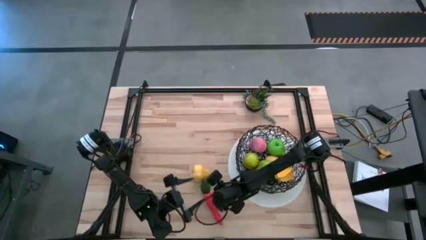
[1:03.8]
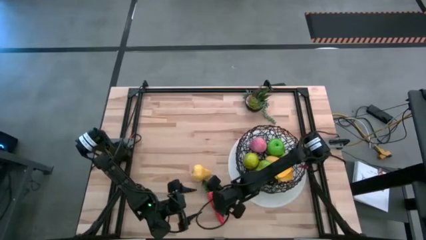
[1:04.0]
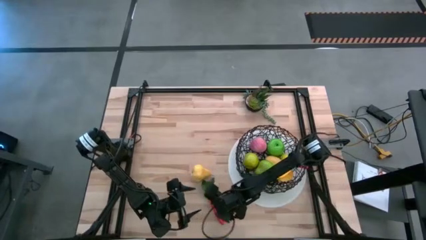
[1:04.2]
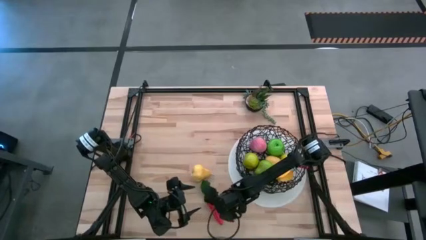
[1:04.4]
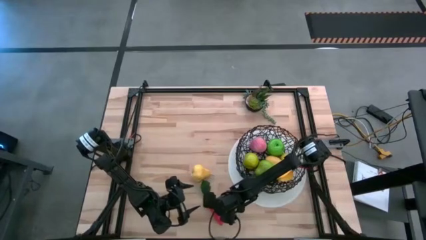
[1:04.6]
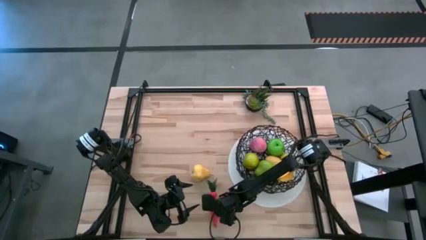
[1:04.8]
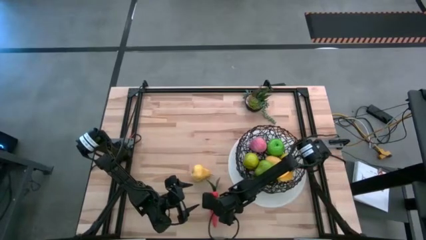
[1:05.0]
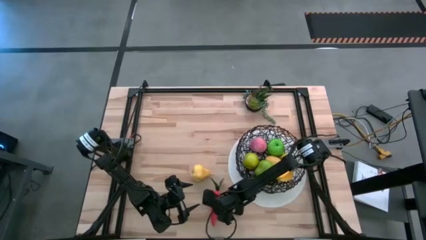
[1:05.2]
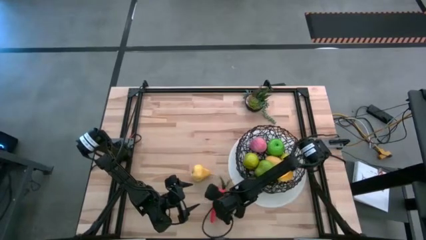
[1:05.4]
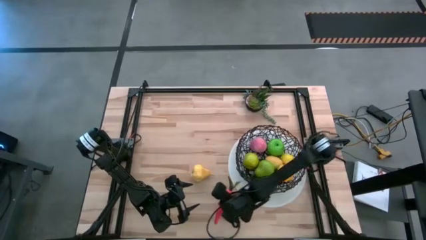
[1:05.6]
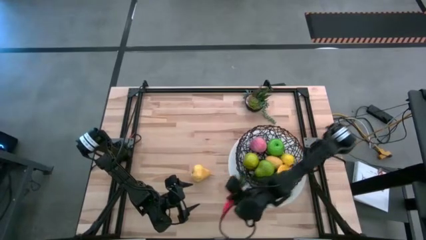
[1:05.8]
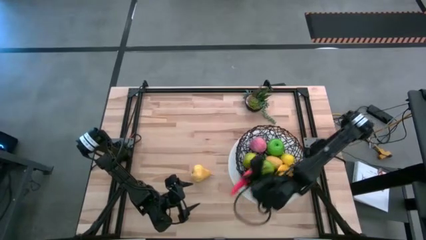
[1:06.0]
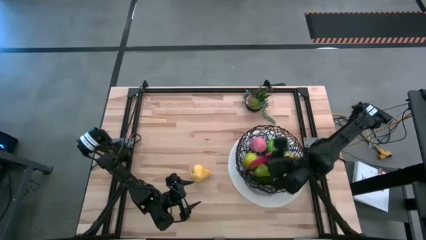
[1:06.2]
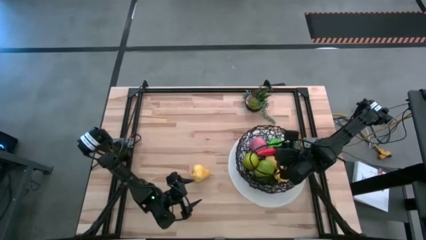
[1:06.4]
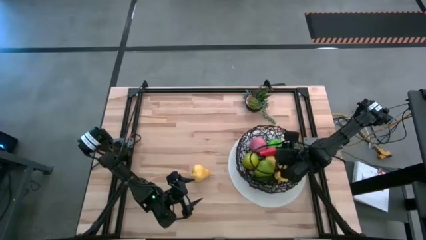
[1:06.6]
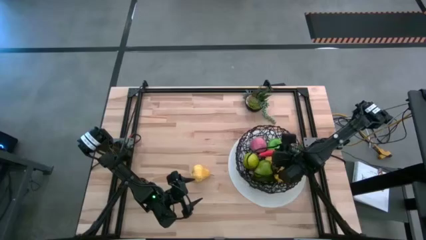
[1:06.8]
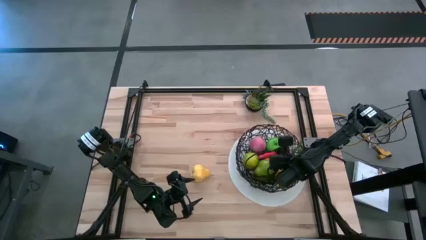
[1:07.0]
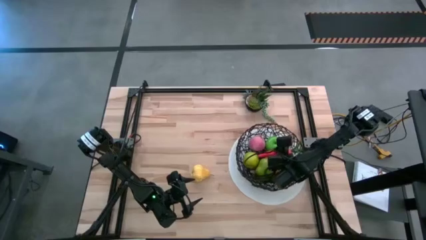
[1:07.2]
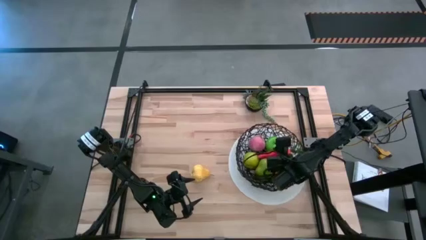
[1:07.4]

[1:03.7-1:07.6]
Task: Build produce basket
Put the carrot into the wire basket

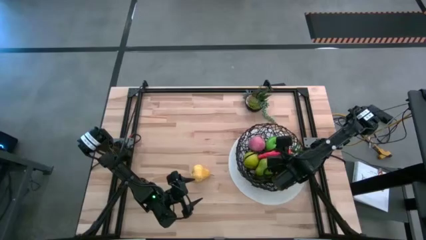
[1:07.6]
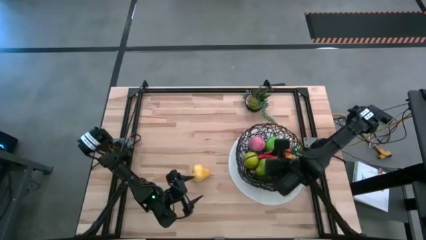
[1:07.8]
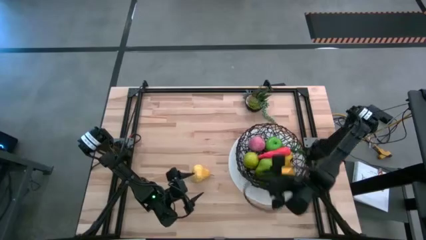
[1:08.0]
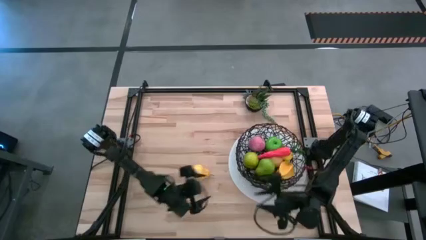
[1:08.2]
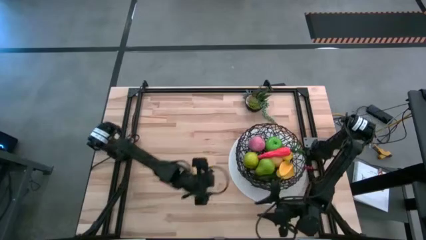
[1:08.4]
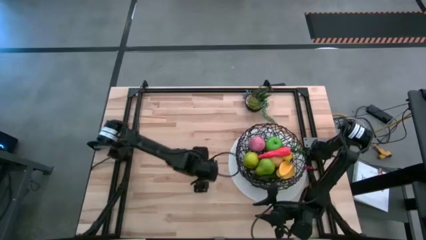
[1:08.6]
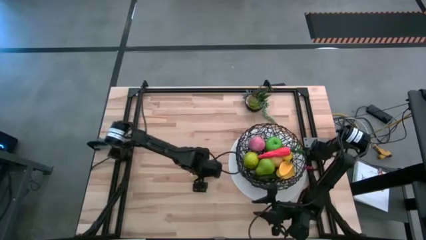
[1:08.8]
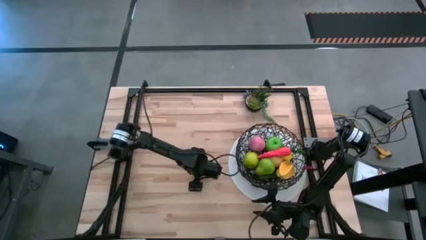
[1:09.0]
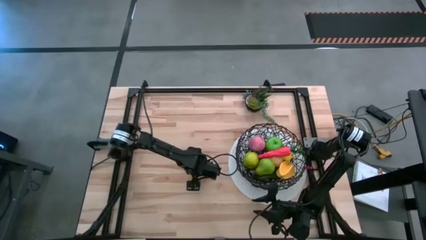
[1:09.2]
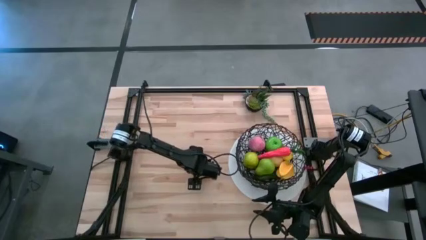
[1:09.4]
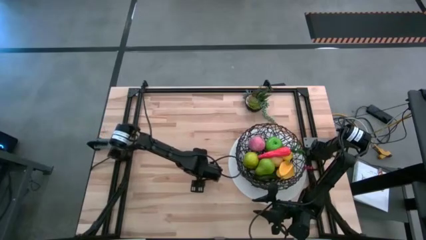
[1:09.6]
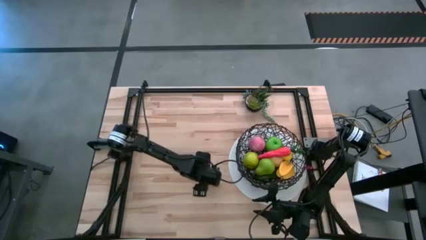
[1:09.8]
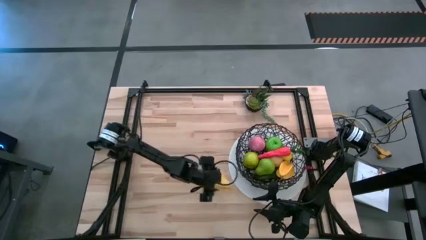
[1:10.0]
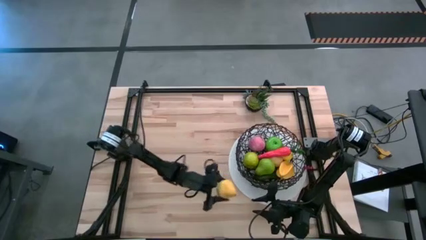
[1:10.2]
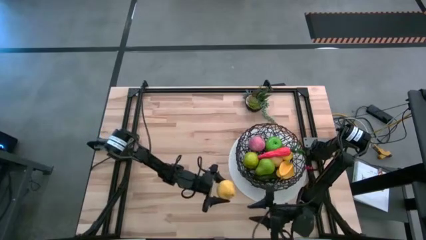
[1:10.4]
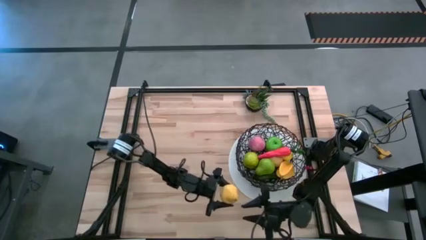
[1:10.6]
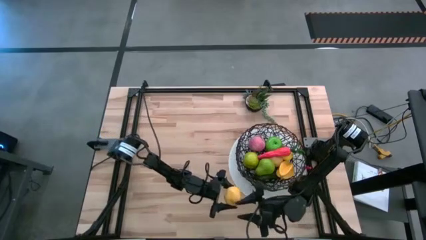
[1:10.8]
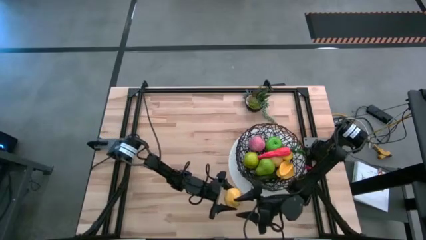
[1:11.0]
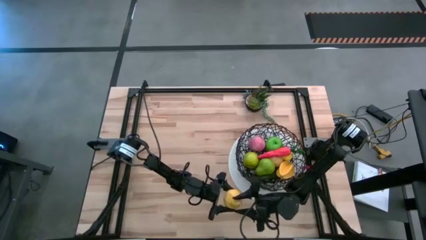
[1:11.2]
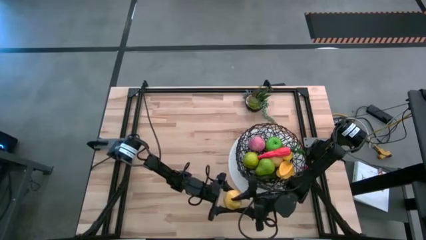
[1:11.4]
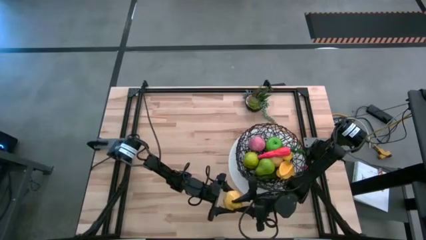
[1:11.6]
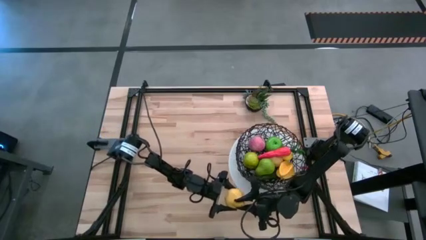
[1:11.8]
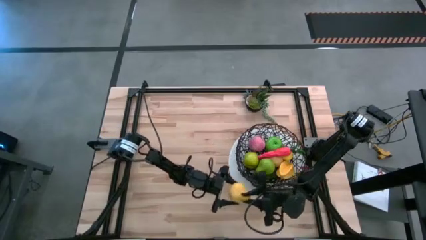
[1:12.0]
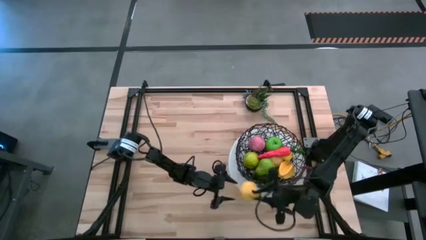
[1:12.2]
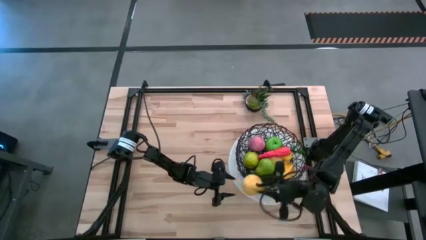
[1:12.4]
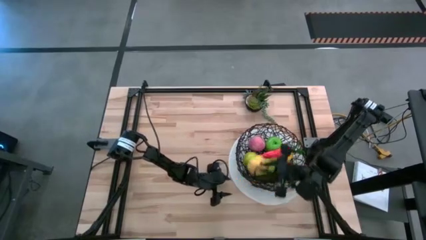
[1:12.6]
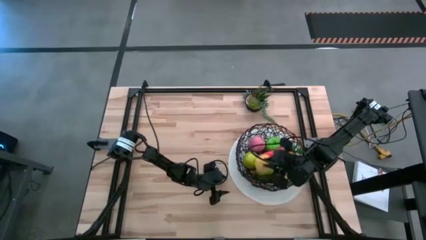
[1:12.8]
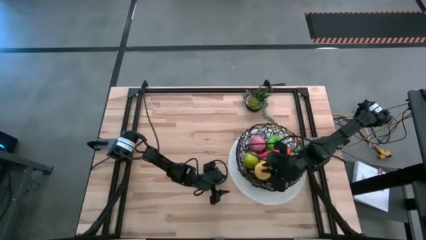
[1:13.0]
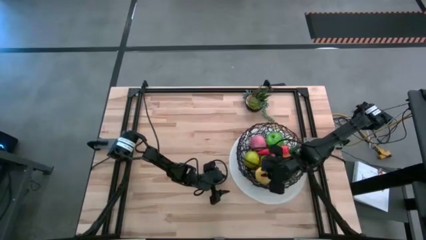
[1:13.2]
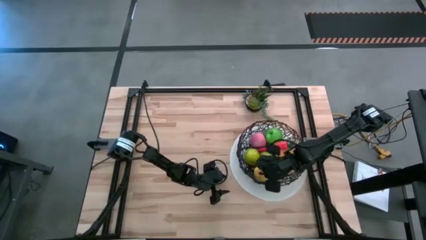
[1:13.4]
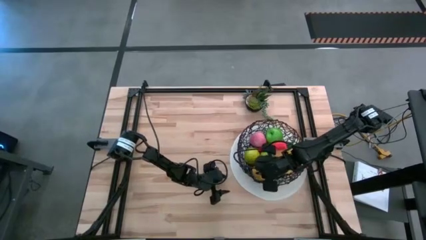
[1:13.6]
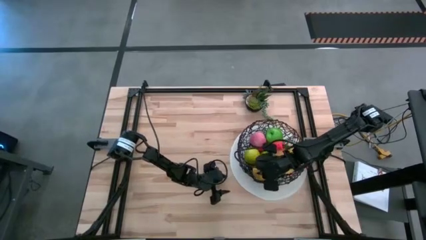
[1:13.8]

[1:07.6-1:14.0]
Put the yellow pear into the wire basket

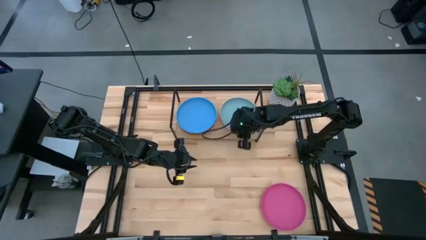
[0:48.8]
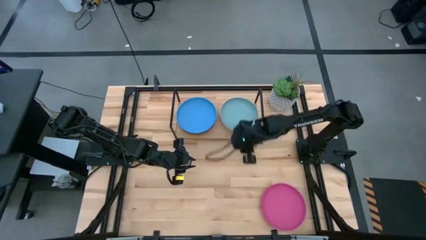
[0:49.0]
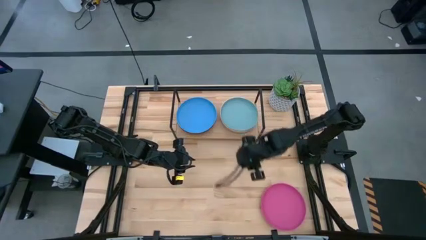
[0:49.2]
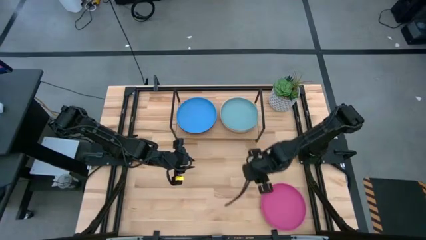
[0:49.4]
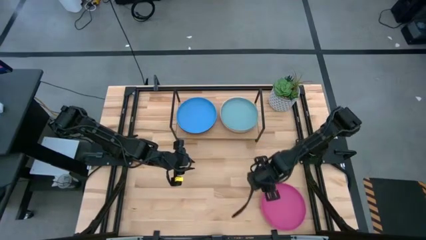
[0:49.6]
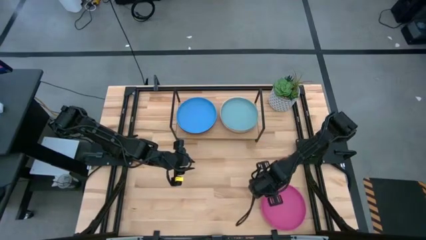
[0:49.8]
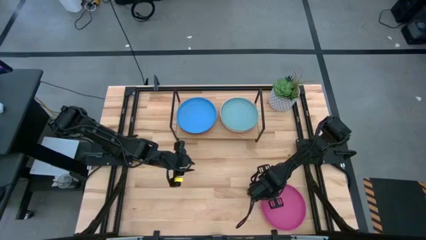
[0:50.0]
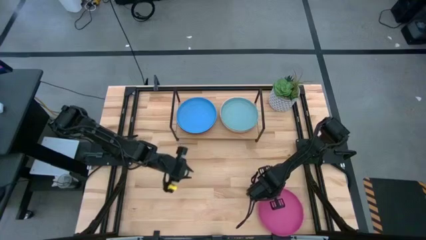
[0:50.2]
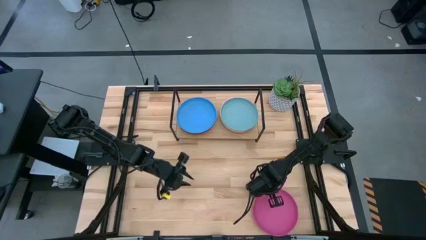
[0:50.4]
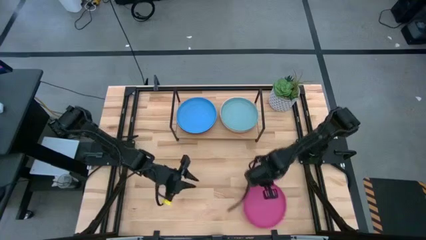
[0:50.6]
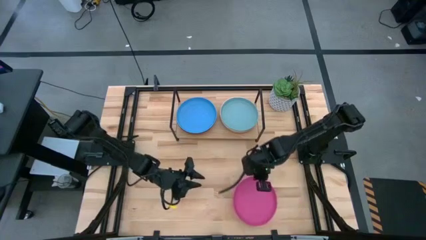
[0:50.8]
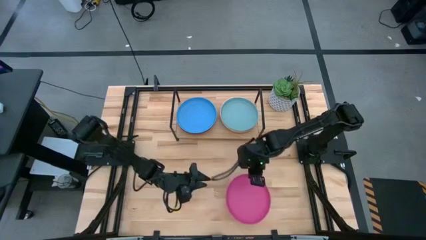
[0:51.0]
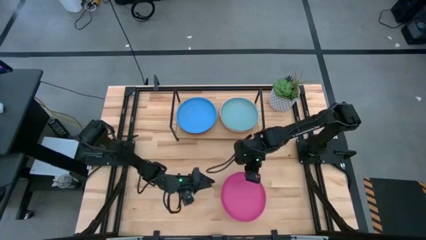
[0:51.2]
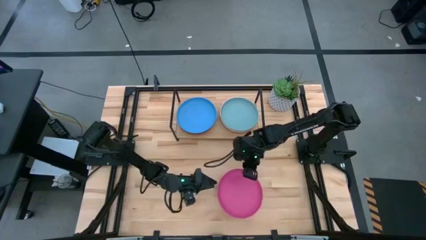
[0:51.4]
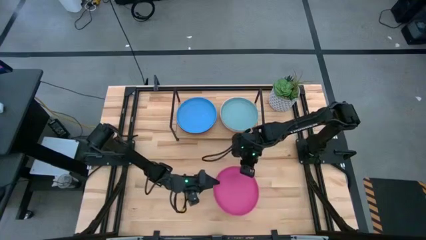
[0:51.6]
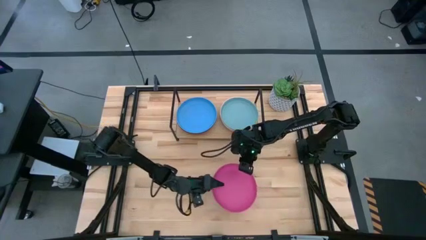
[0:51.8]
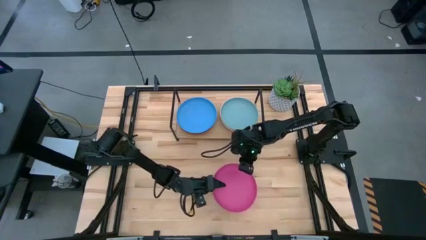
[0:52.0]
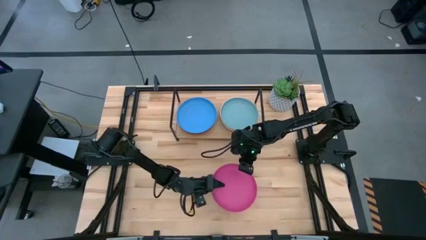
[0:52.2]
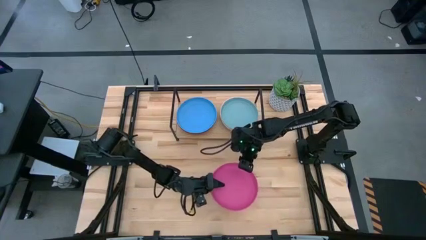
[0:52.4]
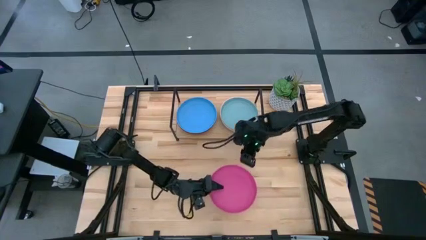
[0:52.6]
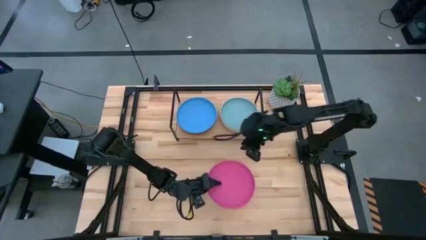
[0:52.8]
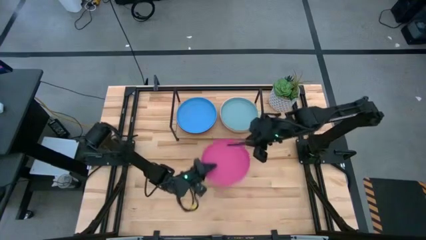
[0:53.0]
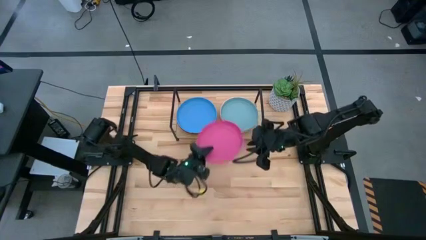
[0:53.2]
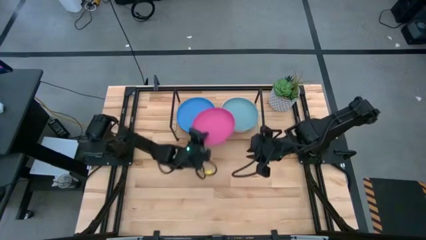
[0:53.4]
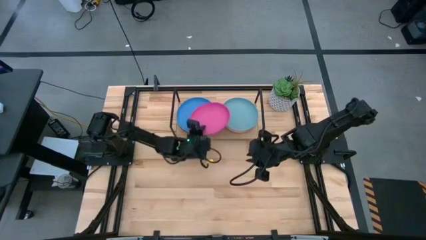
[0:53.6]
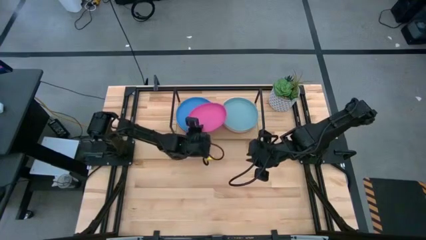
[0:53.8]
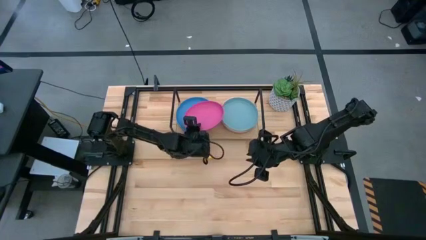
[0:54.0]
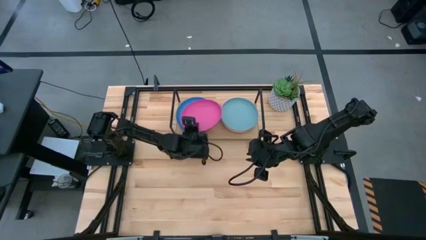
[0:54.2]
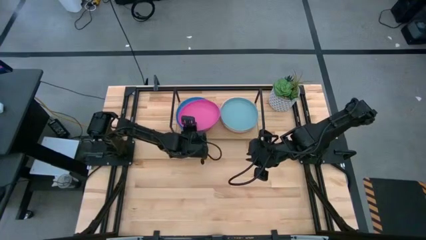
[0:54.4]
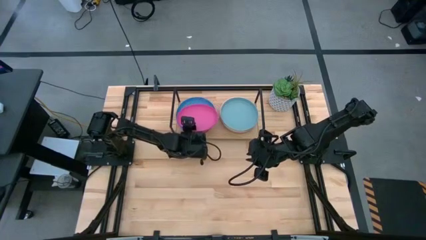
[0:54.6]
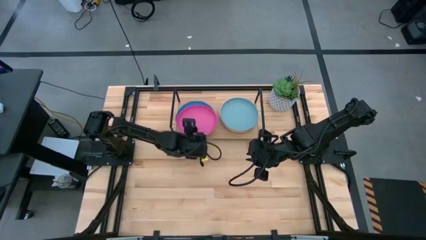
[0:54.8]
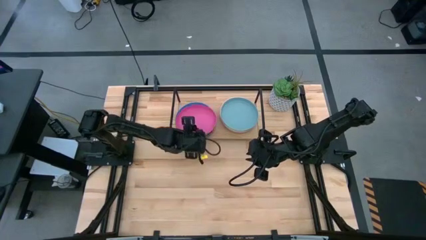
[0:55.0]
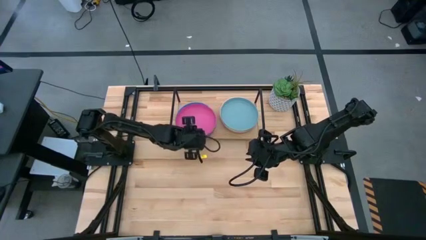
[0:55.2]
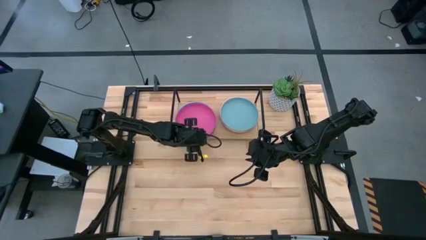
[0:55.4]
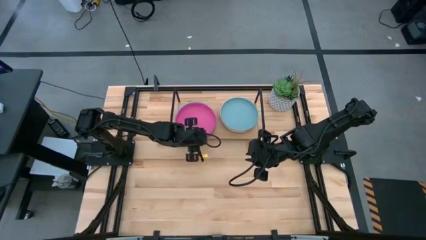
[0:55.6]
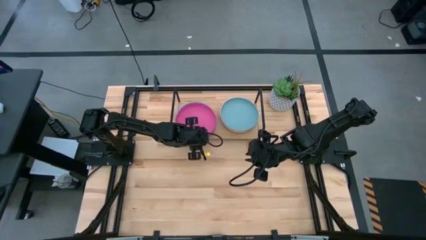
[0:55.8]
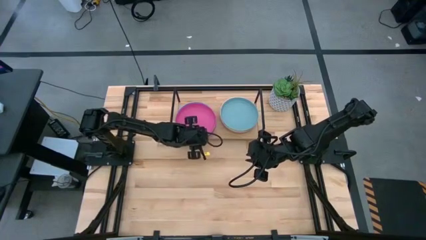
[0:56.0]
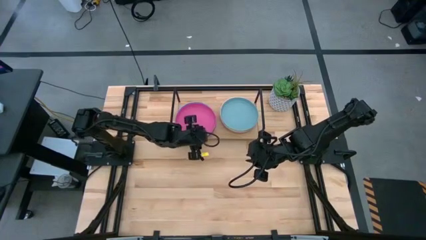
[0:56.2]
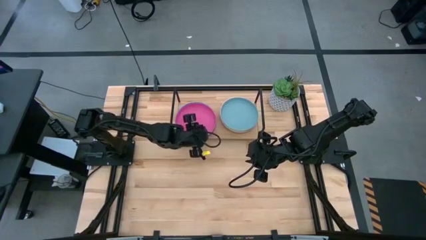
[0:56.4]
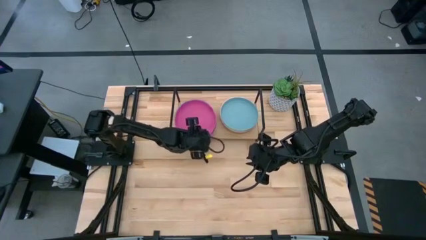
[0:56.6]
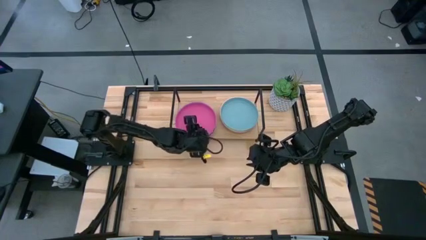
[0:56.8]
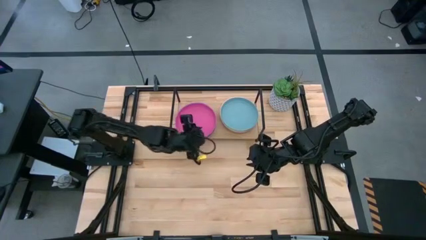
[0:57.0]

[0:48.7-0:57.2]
Task: Place and stack plates onto a shelf
Stack the pink plate on top of the blue plate on the shelf
